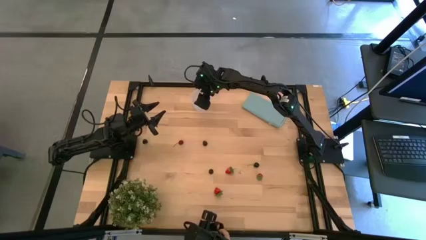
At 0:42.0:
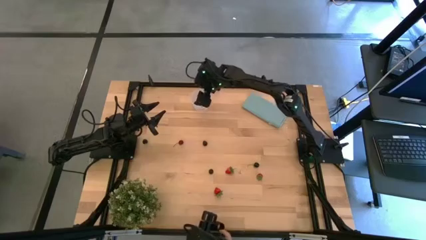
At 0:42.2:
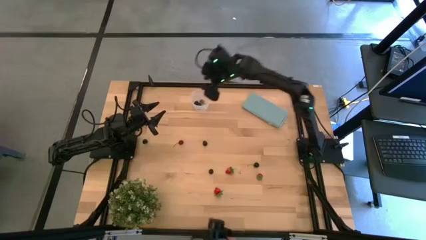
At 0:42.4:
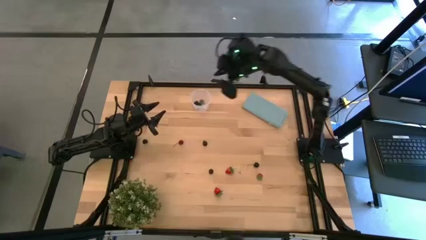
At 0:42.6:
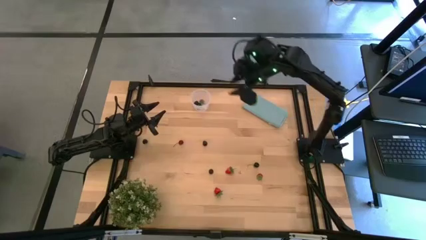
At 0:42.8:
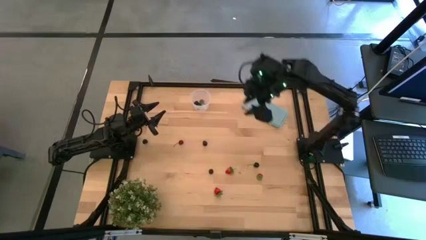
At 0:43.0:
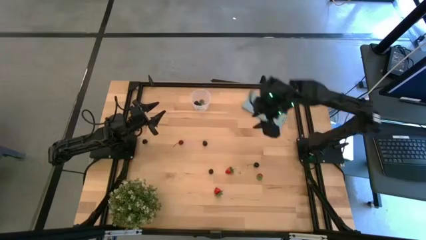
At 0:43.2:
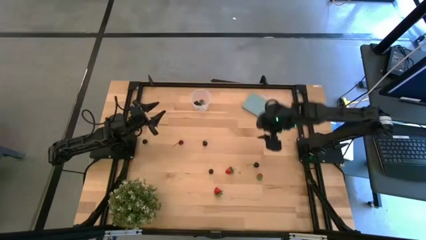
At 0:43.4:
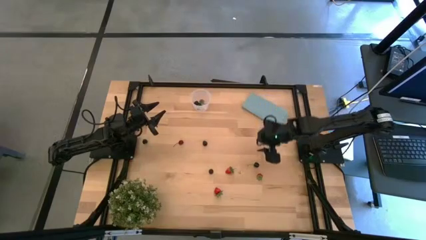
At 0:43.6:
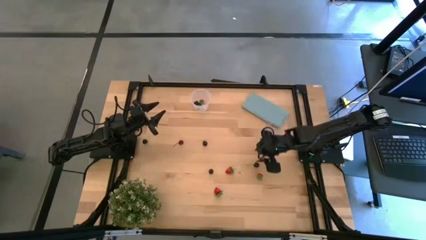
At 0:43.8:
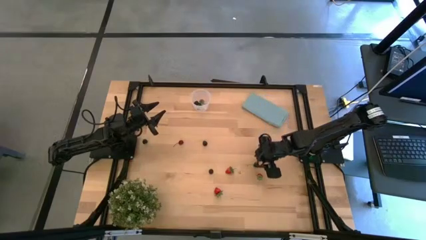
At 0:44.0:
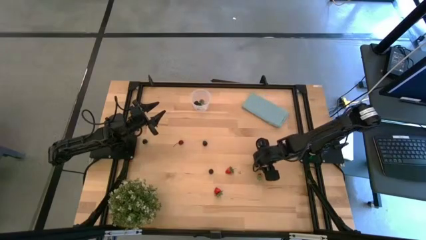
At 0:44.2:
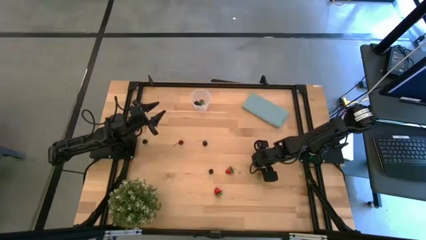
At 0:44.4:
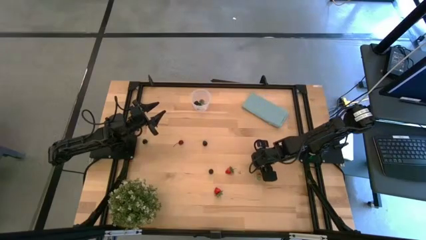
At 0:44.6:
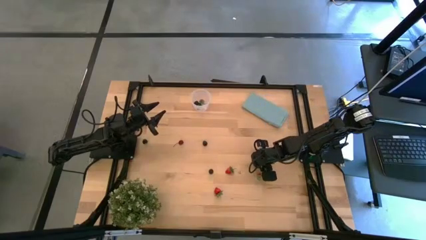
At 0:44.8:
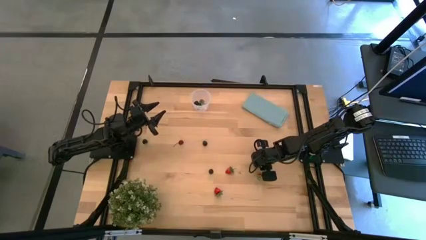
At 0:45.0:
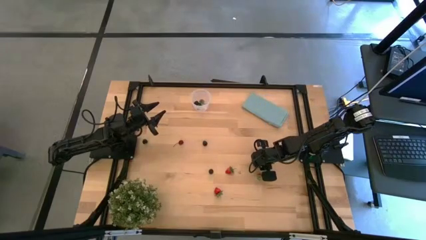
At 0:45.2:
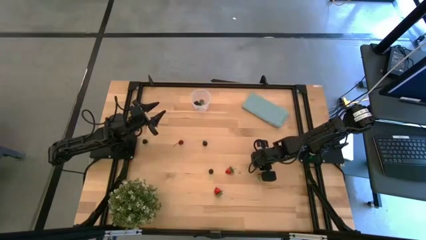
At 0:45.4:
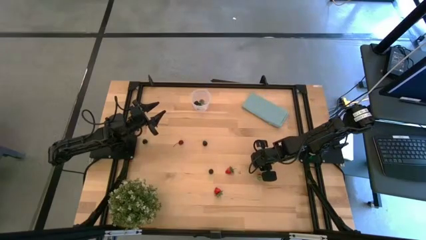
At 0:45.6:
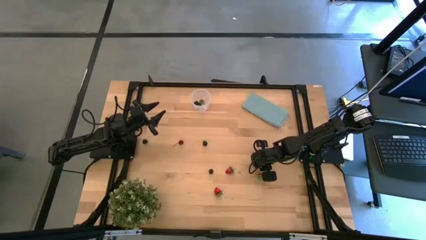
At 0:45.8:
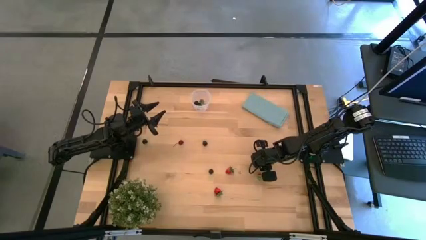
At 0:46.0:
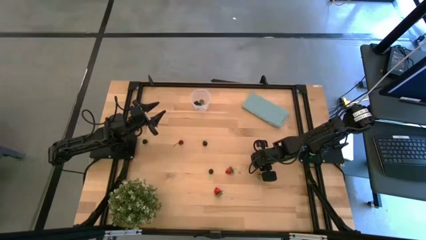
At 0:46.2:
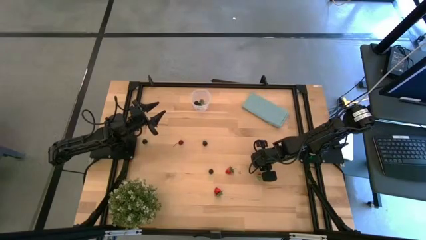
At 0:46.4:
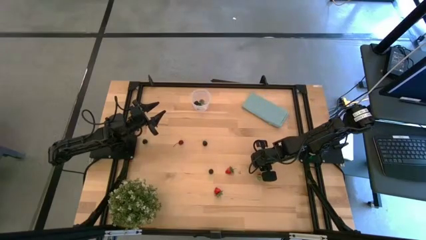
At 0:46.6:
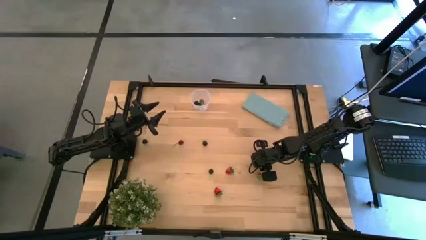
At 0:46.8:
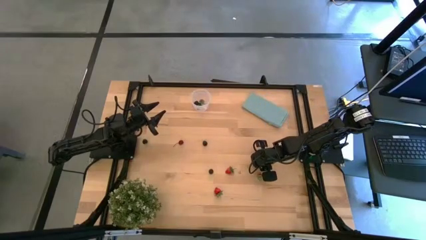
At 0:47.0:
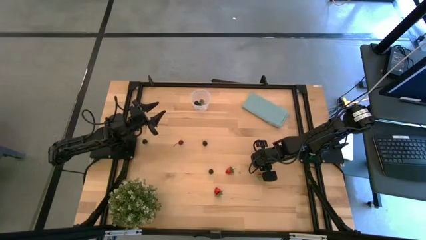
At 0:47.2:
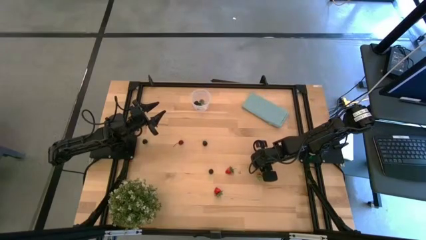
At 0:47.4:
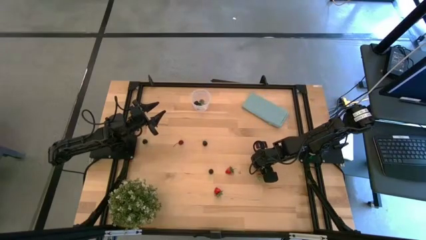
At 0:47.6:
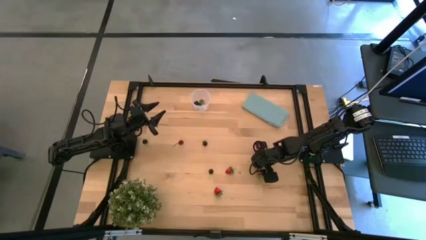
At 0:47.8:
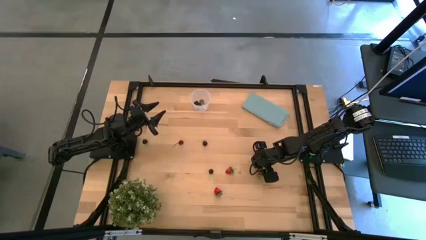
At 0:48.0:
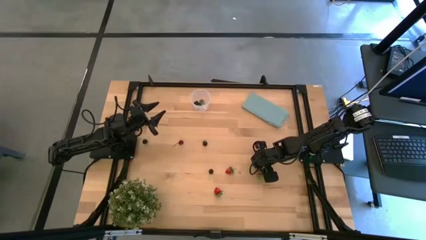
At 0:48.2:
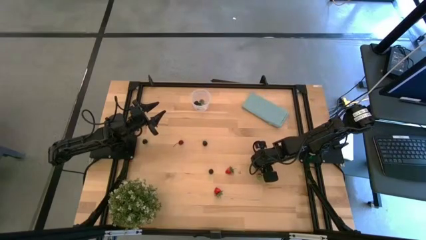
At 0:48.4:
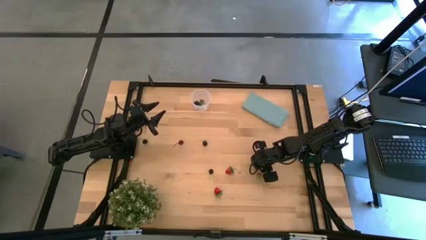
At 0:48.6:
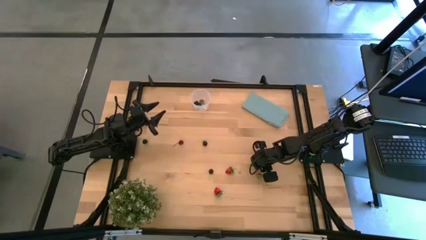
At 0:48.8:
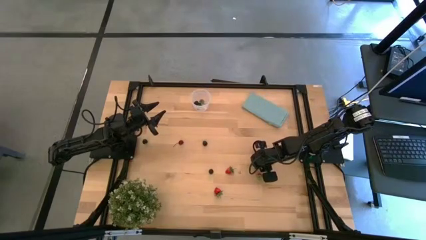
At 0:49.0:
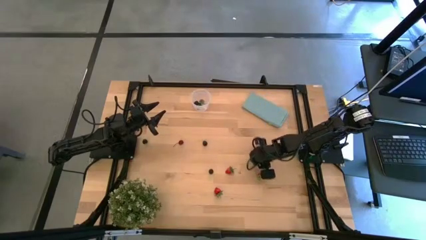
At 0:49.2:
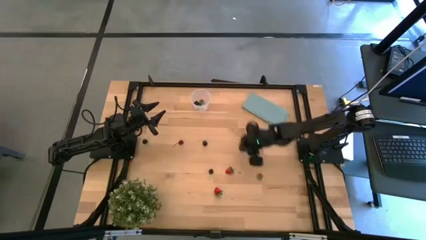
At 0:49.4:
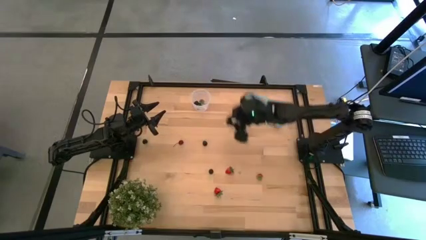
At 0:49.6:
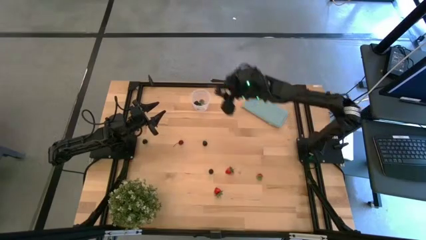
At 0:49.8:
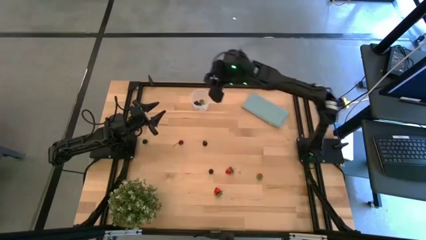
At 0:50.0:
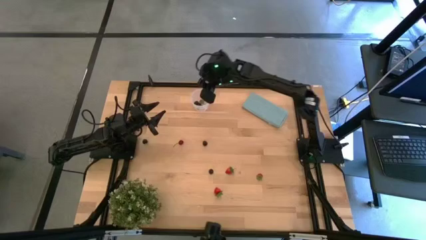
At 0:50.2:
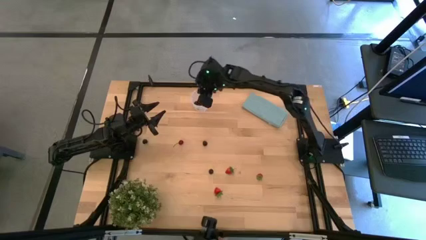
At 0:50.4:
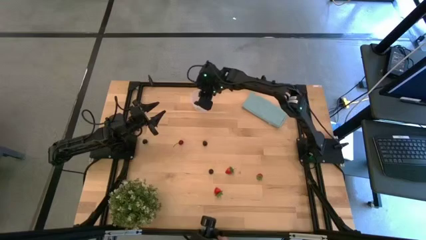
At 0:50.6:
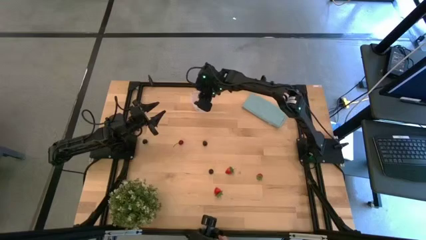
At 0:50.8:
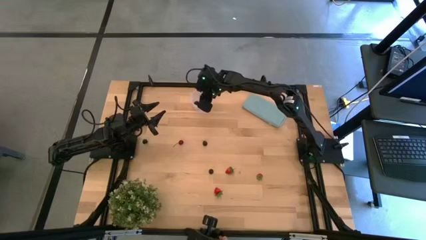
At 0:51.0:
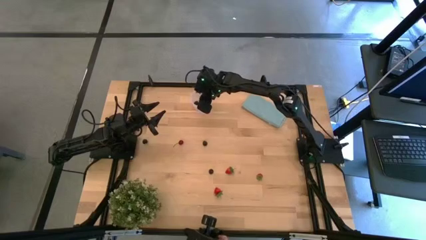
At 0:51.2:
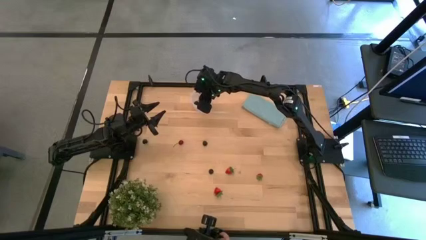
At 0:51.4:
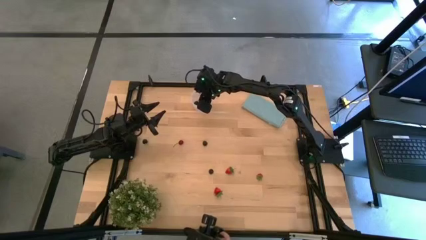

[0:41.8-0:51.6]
Task: Pick and placing Produce into tupperware
Put the right black cherry into the transparent bin

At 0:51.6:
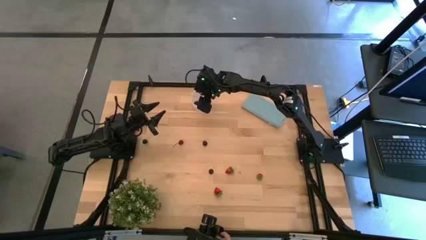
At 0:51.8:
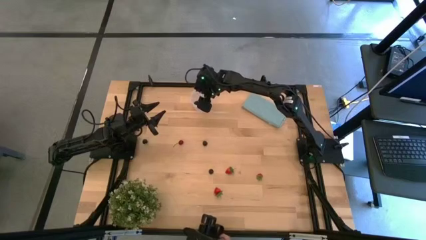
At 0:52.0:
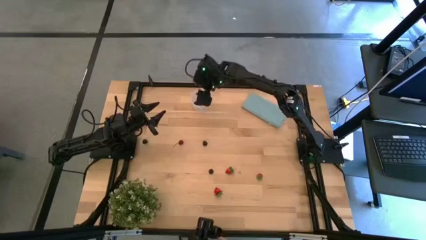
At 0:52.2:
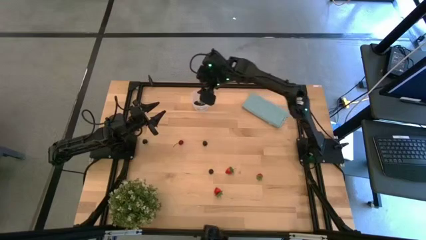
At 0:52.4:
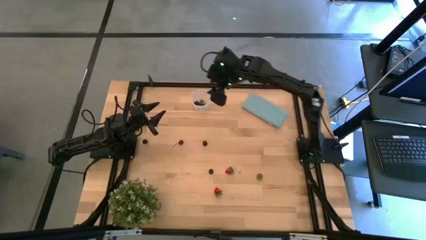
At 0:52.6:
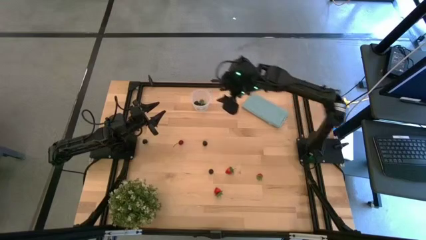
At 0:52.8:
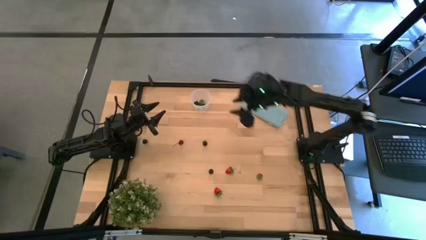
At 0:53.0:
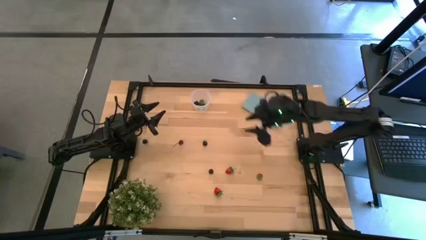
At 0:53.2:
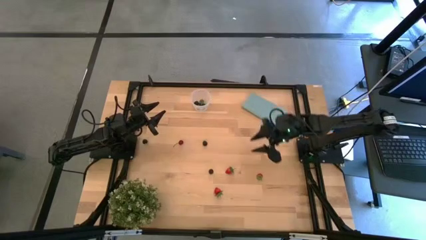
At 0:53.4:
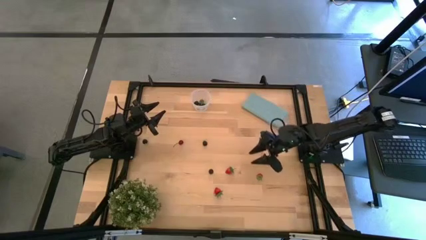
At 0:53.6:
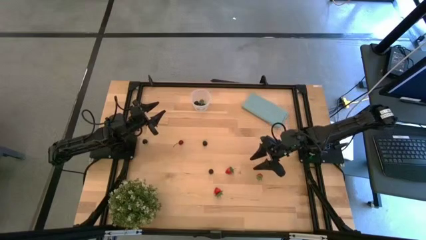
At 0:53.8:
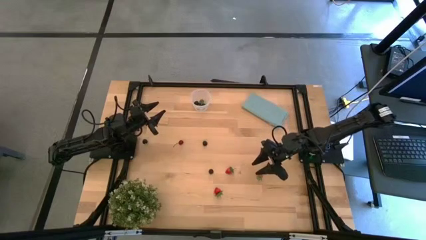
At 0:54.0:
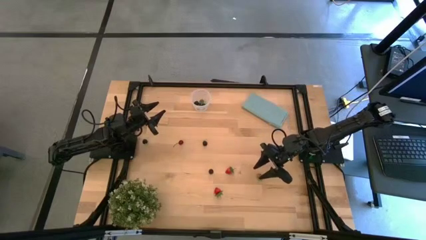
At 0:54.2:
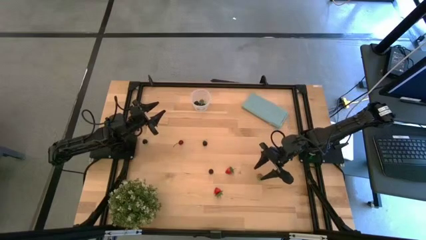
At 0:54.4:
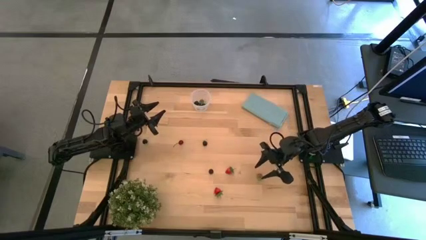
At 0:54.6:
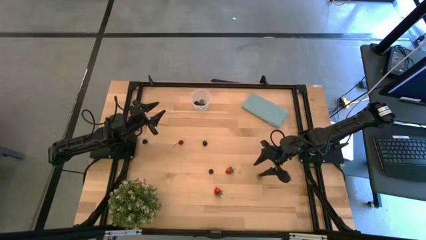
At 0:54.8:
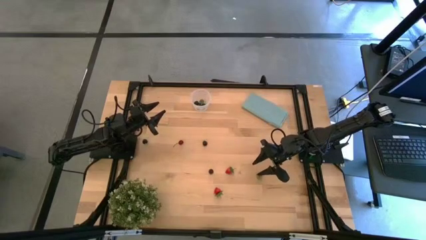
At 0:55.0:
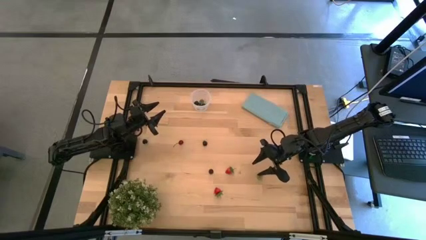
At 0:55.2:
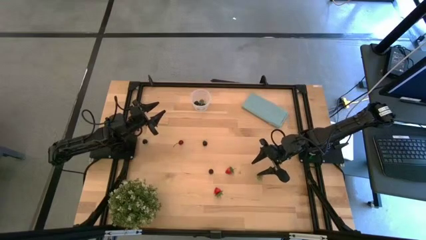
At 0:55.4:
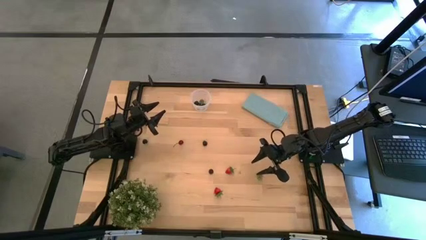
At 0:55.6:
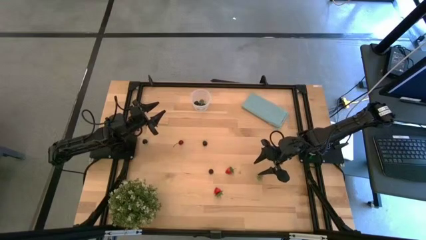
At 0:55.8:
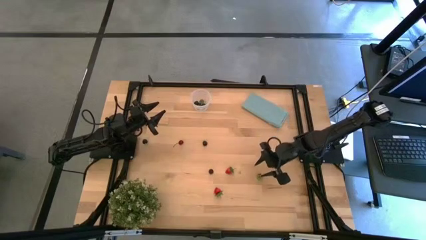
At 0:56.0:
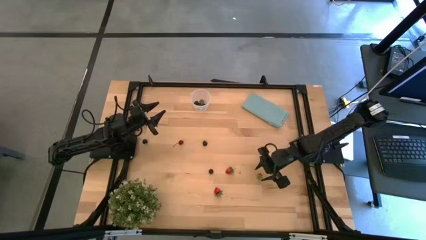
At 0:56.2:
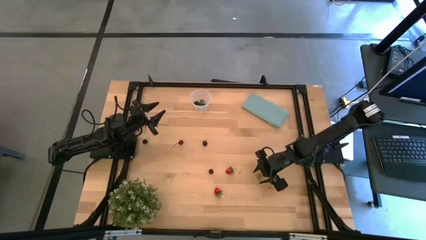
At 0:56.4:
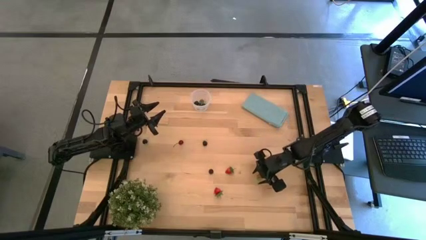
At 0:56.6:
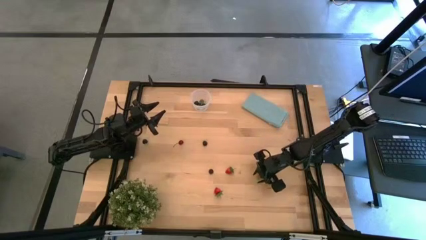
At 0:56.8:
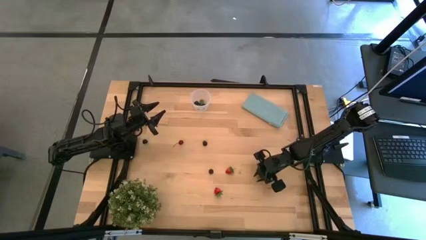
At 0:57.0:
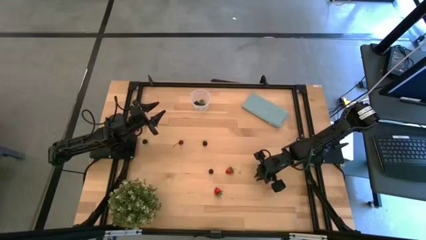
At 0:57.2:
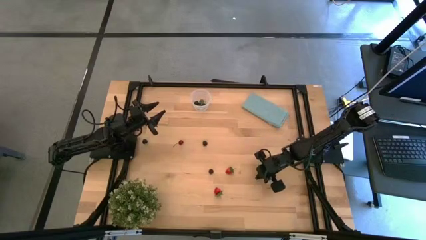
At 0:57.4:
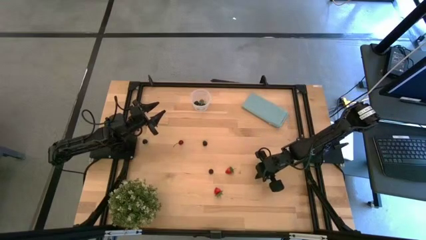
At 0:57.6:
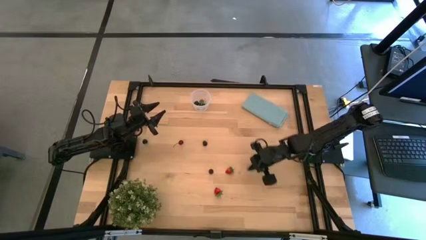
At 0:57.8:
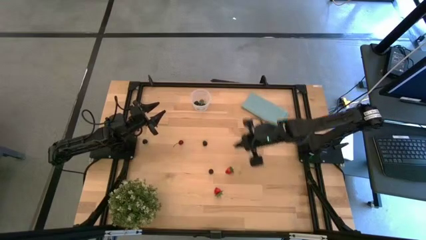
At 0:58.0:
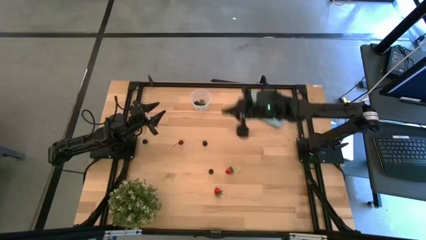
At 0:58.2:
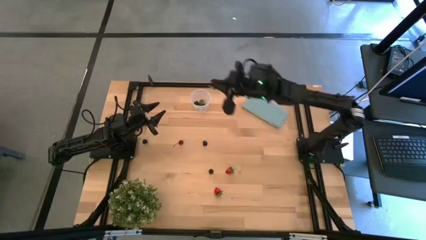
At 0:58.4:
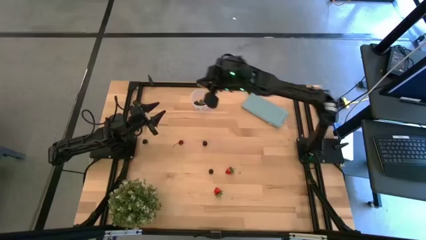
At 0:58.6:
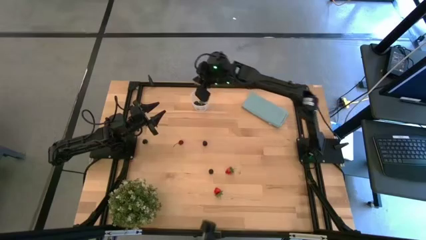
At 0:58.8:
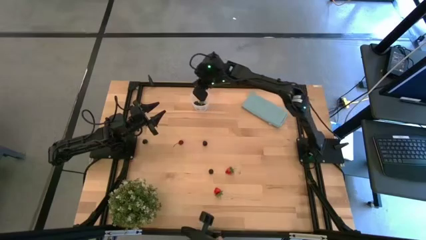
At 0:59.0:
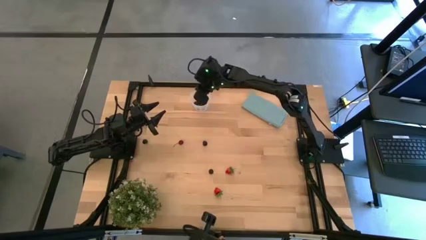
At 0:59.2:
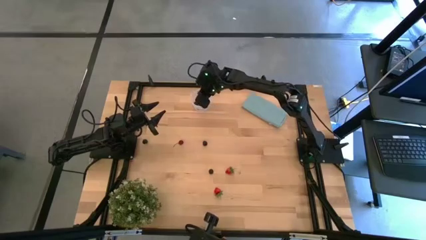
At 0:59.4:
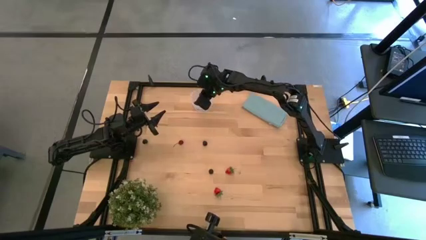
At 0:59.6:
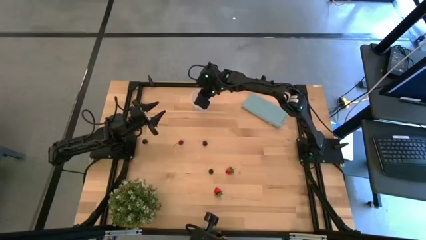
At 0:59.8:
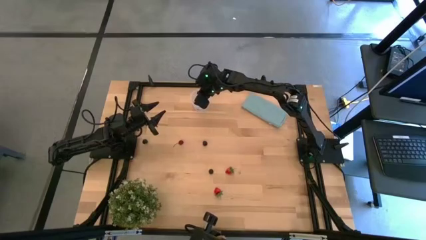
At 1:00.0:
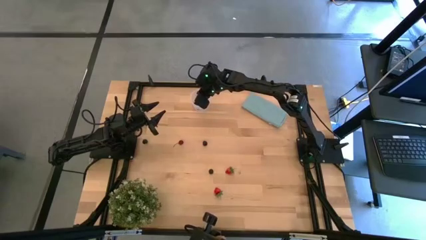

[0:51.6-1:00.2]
Put the right red strawberry into the transparent container
